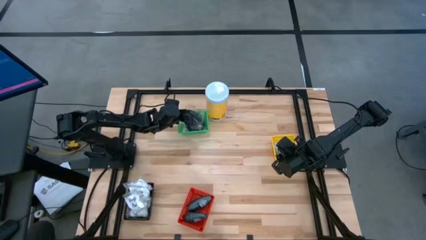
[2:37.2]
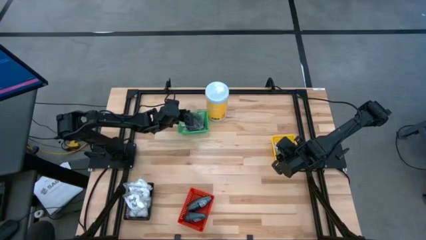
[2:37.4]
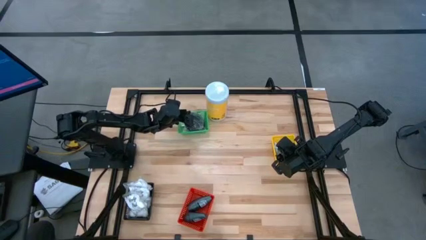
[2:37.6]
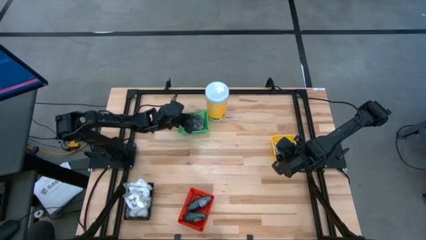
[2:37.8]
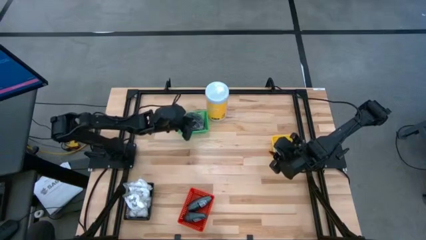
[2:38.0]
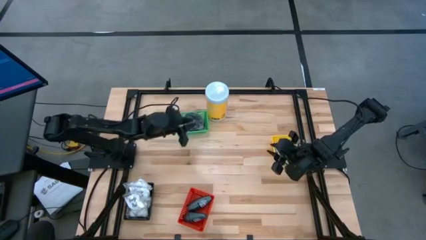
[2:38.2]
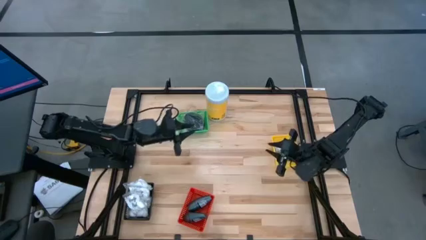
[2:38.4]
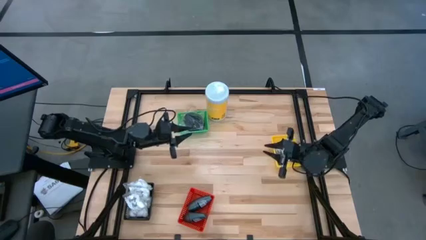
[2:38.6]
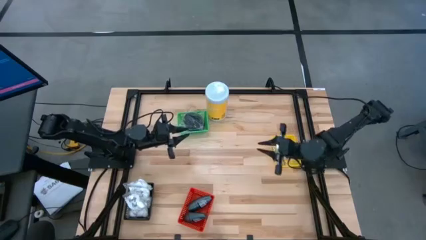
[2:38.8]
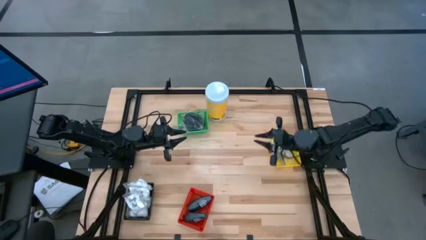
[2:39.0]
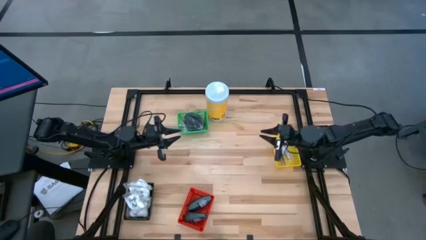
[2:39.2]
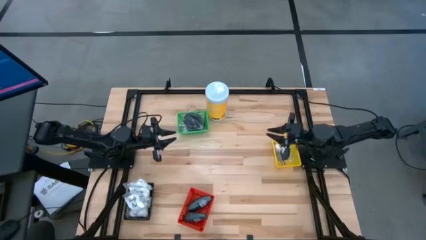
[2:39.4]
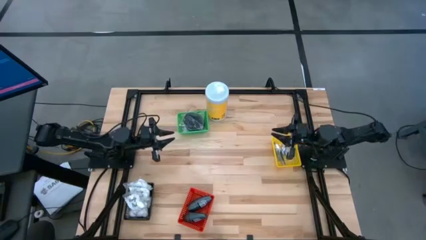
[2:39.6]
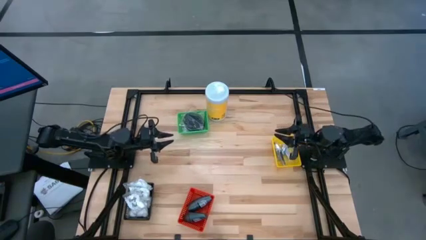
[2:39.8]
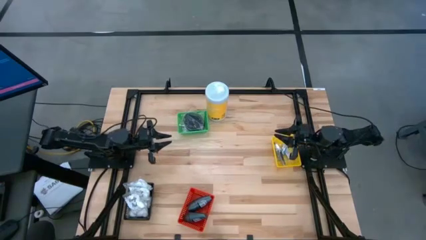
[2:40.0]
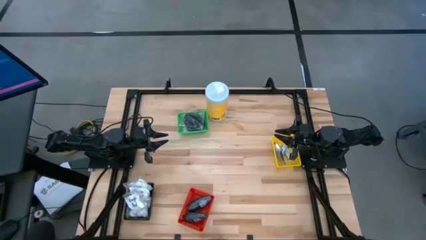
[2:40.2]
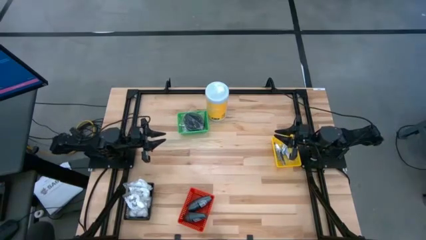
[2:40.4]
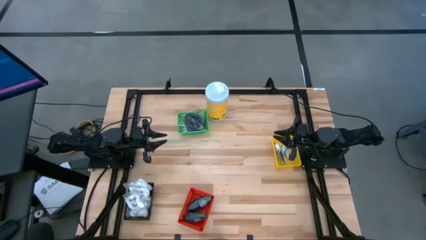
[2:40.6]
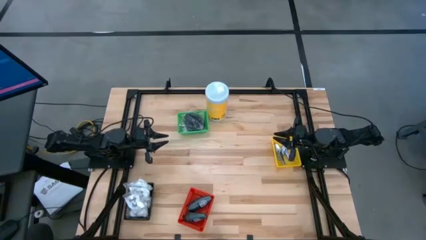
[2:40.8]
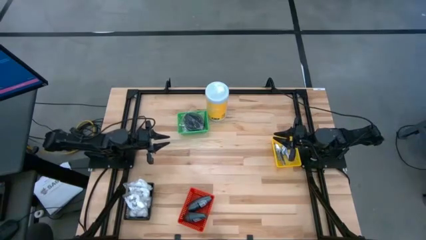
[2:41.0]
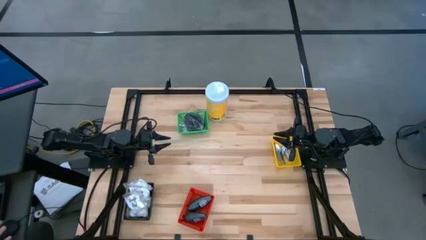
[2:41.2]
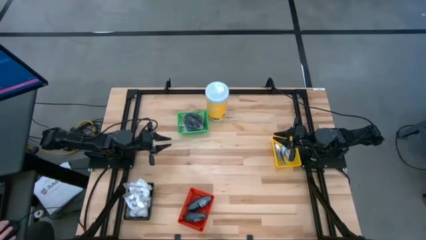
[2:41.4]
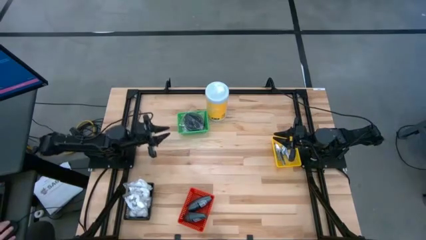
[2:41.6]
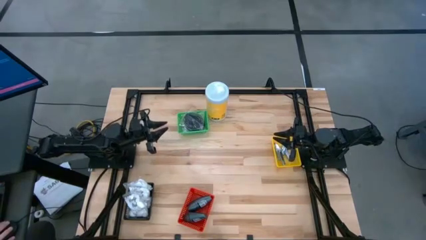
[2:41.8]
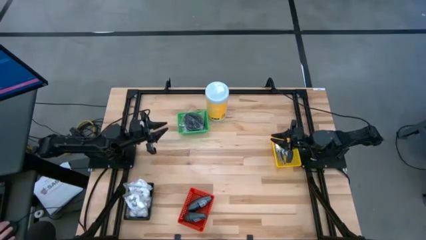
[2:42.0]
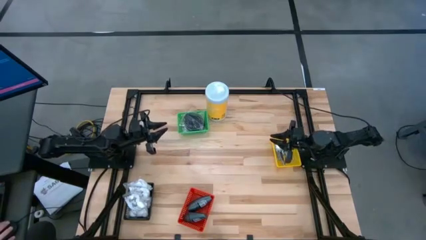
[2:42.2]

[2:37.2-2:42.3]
Task: Pick & Place Travel size toiletries
Return to Home Position

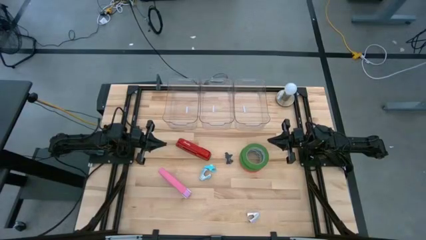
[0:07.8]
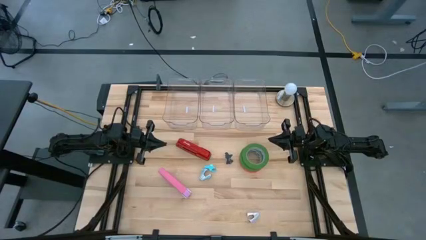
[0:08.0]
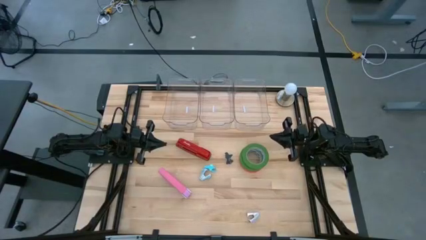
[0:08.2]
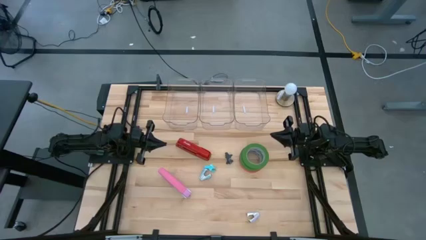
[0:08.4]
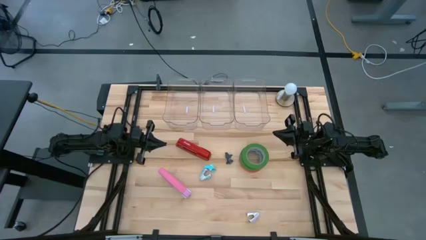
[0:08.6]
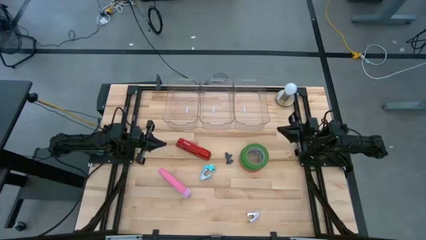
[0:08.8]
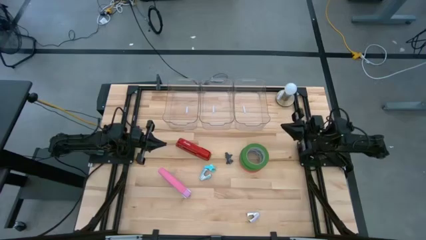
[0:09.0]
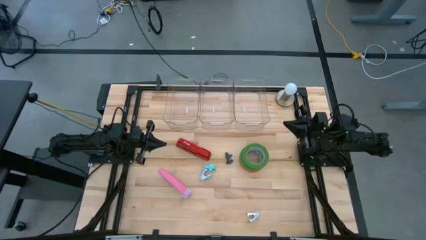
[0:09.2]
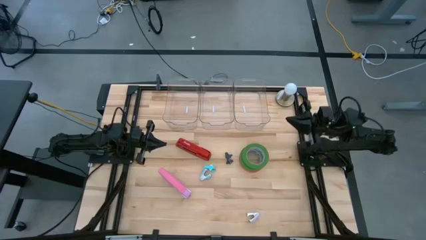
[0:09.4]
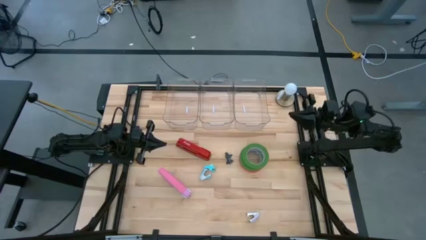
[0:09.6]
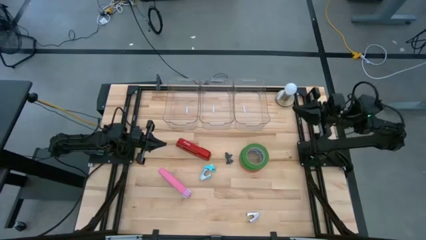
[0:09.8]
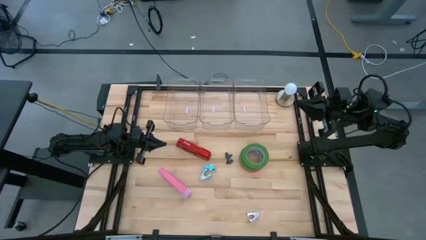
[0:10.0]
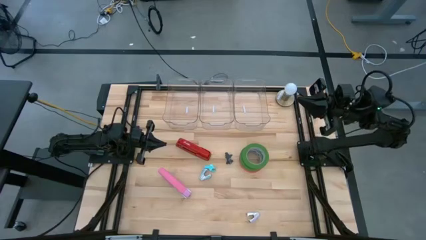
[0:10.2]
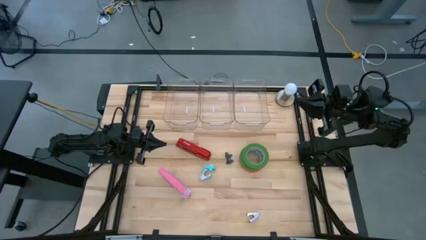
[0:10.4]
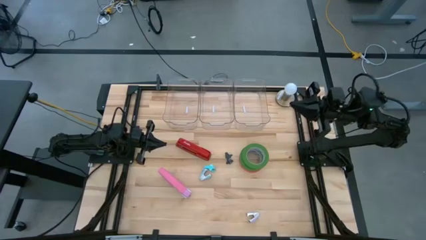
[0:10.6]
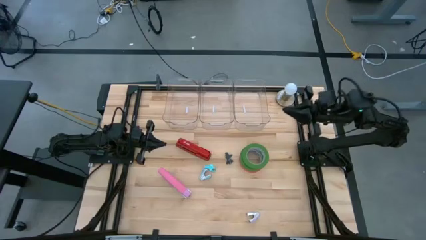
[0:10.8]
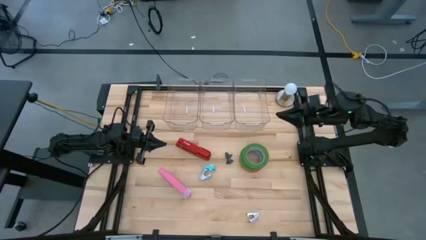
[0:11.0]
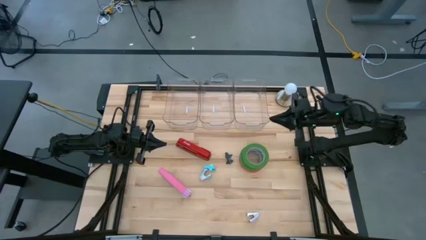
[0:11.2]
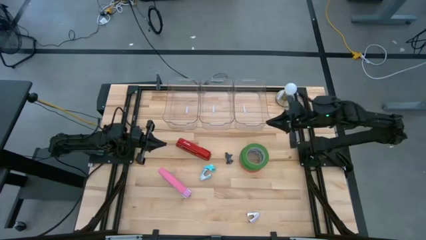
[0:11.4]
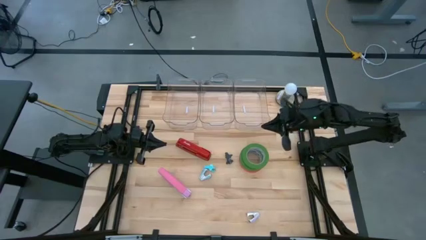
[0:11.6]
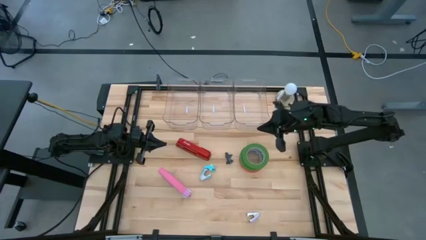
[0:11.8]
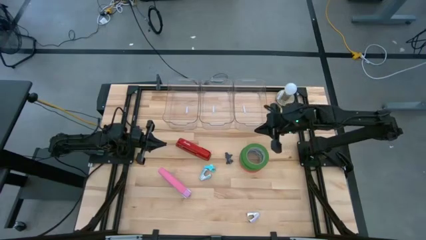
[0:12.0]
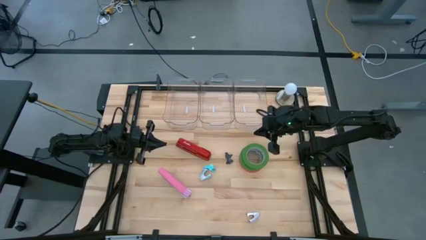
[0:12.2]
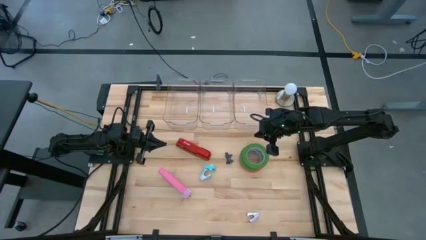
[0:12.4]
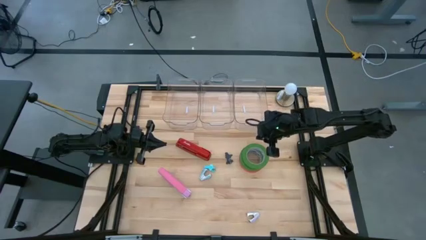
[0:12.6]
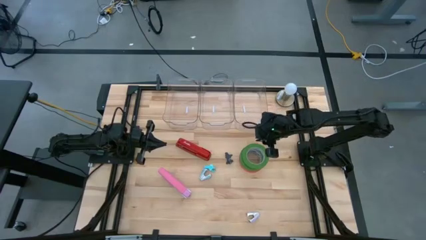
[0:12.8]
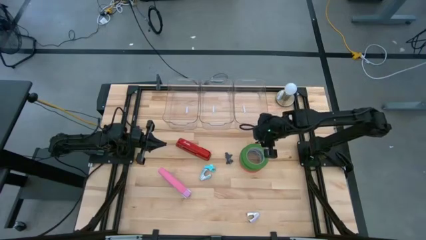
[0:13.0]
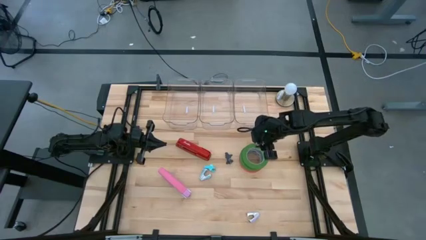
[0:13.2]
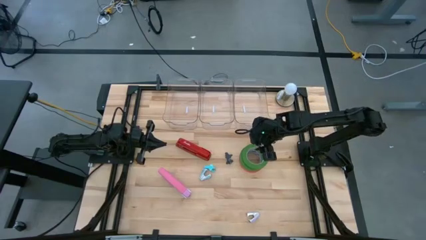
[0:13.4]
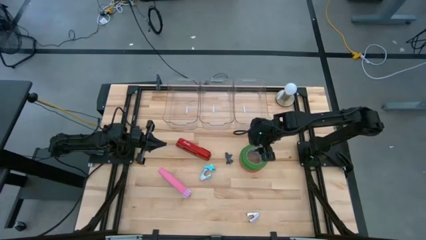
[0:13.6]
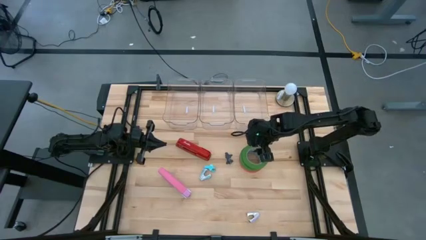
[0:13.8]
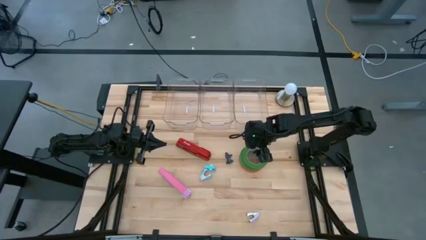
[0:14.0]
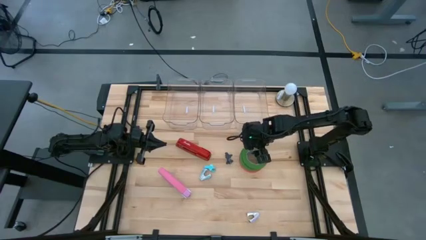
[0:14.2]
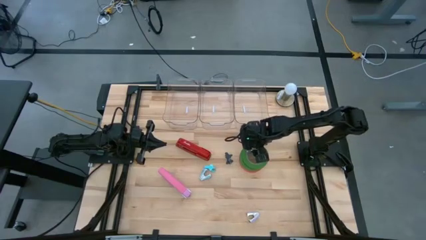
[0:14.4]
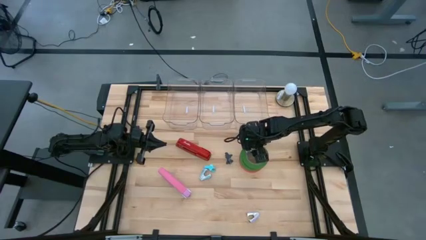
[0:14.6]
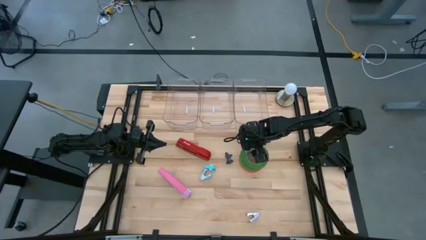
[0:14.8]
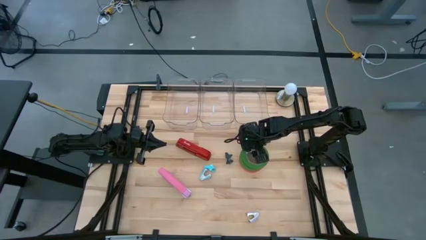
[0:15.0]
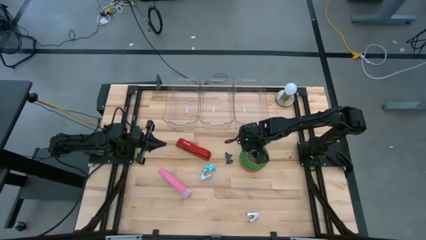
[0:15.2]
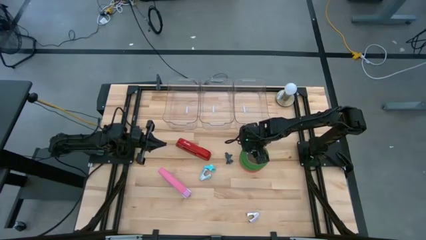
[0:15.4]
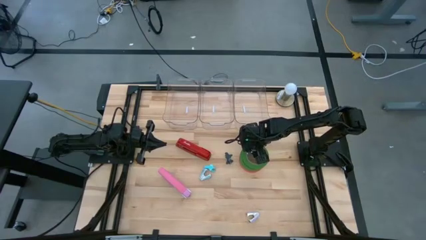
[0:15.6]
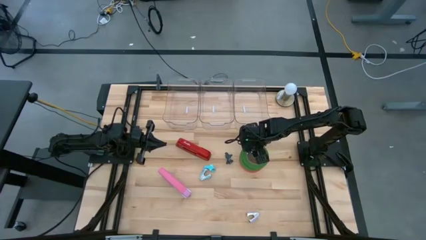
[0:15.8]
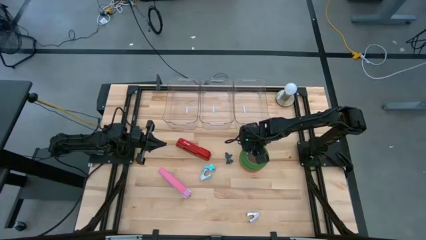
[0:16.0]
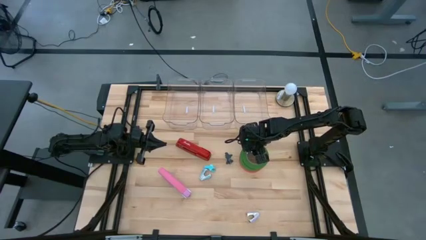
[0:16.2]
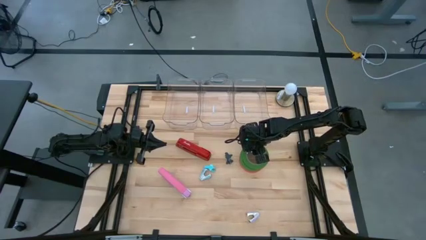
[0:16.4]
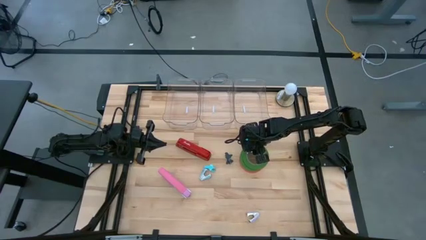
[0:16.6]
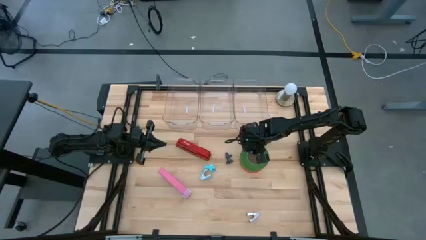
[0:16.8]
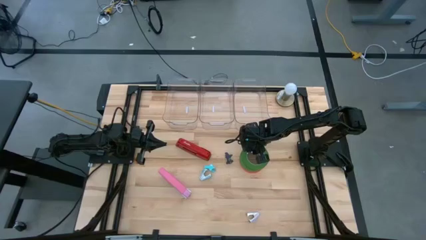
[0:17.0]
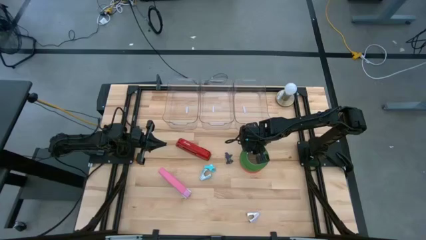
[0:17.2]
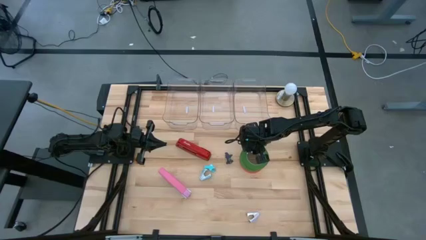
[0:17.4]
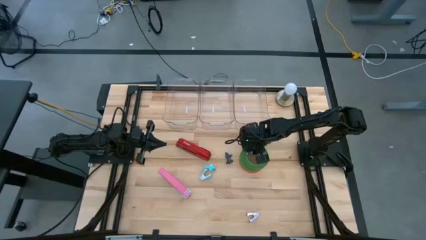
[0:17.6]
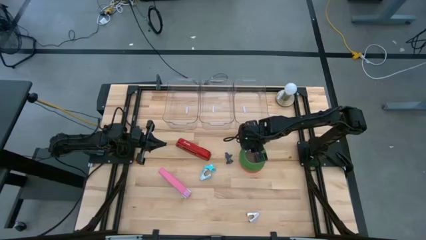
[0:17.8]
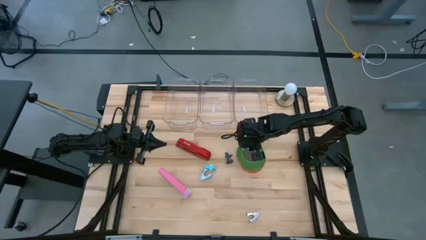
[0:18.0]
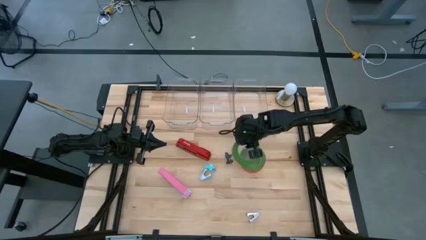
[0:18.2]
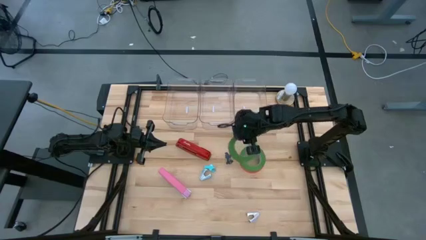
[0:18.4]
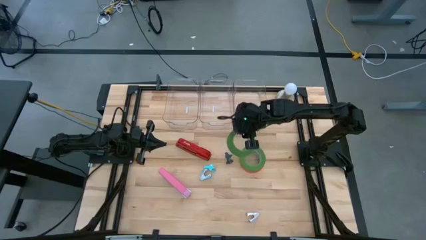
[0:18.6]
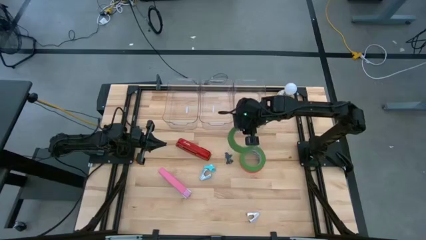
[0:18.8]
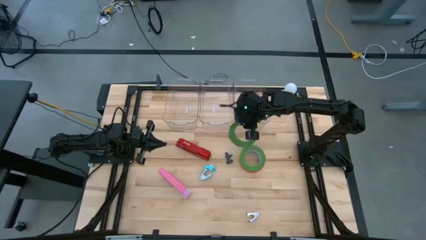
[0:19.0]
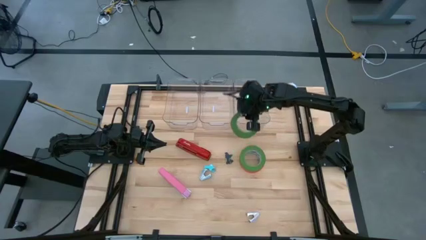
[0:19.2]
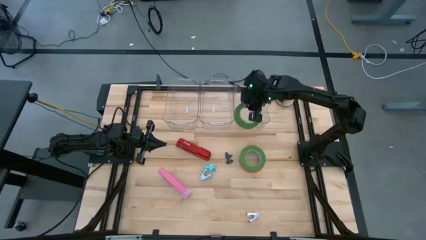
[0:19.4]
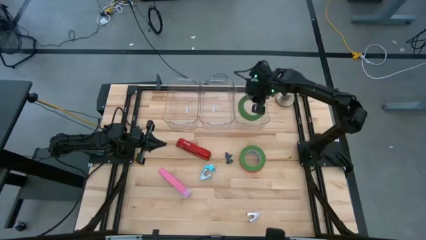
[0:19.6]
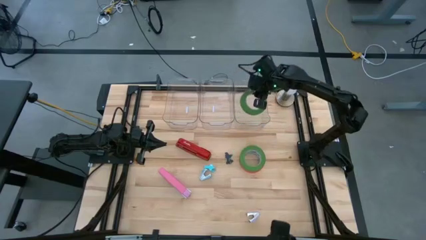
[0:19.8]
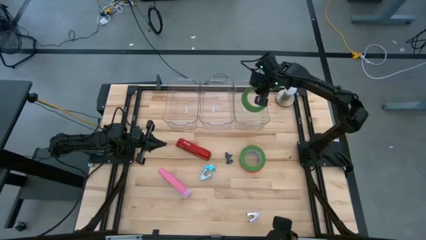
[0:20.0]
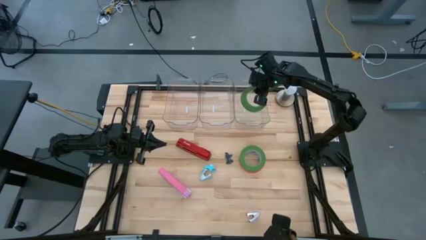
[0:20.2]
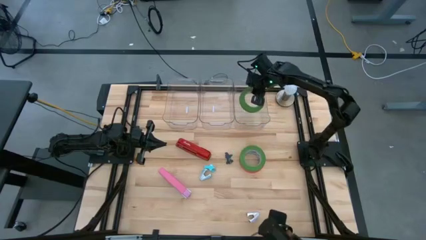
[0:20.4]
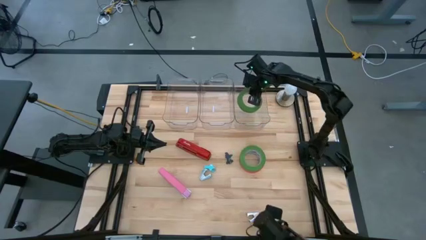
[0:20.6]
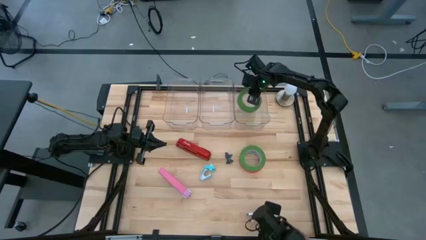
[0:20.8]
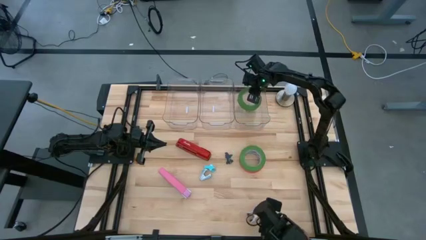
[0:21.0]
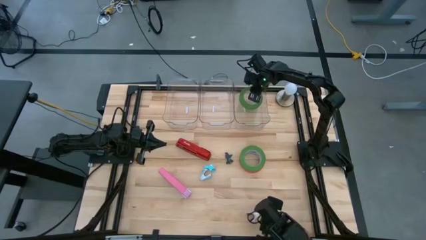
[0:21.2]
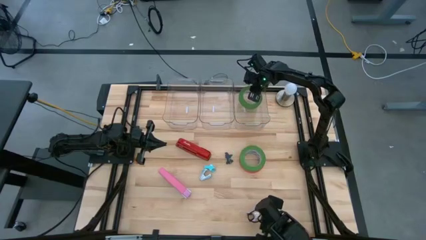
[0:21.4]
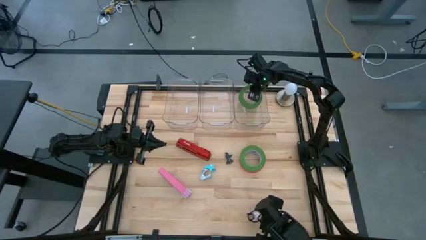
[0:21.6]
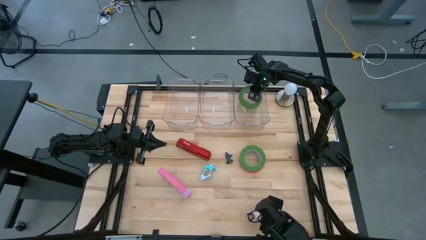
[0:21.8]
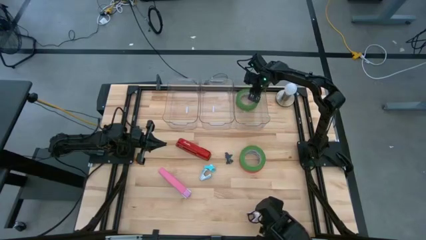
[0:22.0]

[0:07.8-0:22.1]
Task: Pick and place Stapler, Stapler remover, tape
Put the top green tape into the right transparent bin
